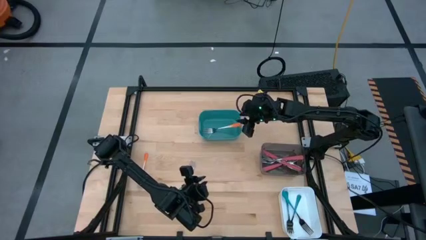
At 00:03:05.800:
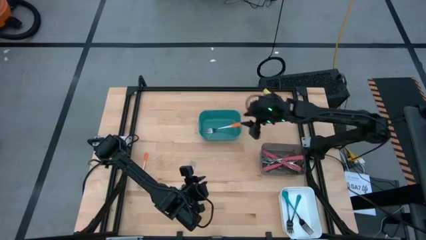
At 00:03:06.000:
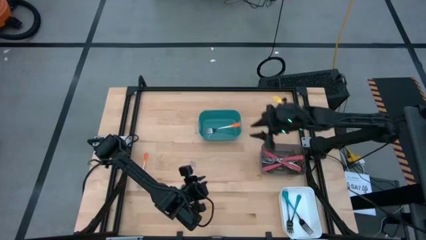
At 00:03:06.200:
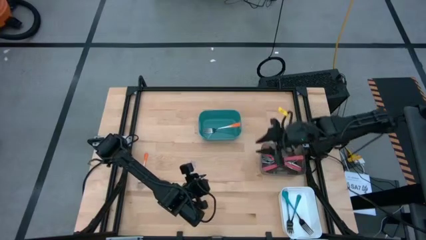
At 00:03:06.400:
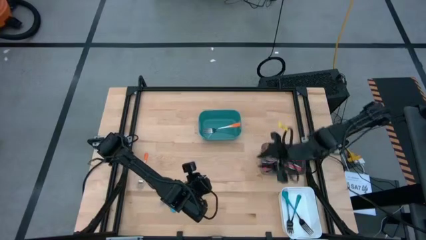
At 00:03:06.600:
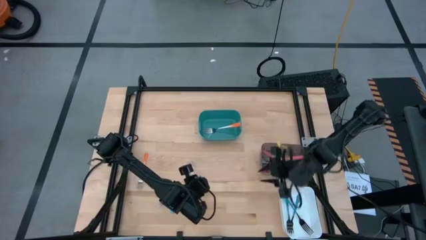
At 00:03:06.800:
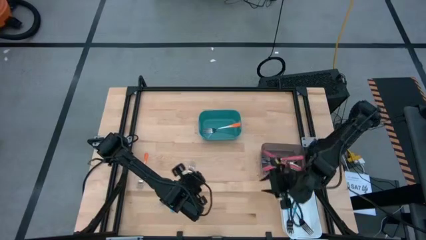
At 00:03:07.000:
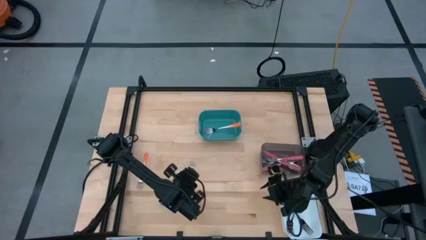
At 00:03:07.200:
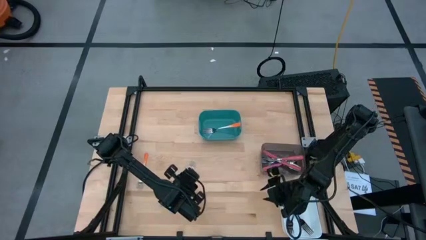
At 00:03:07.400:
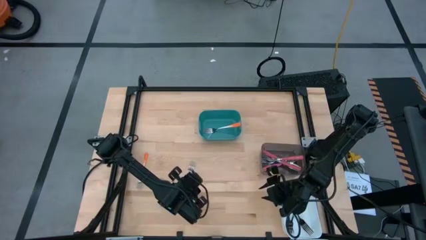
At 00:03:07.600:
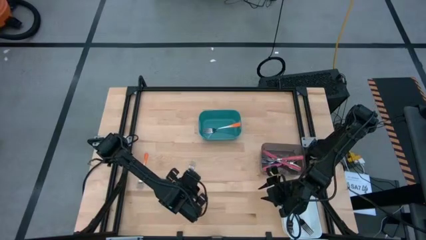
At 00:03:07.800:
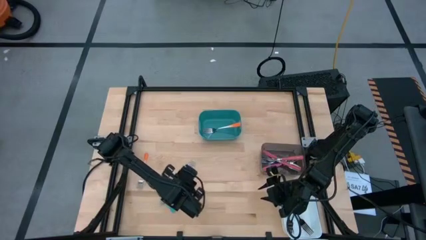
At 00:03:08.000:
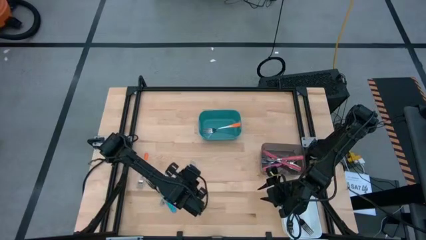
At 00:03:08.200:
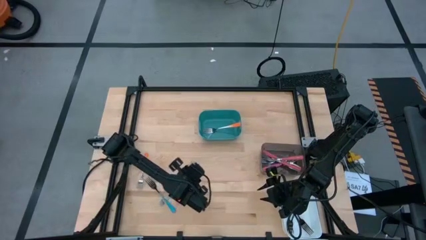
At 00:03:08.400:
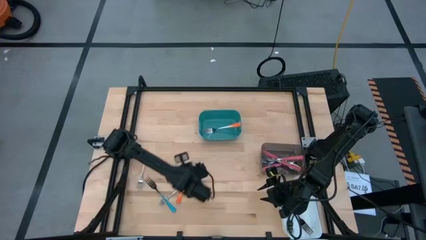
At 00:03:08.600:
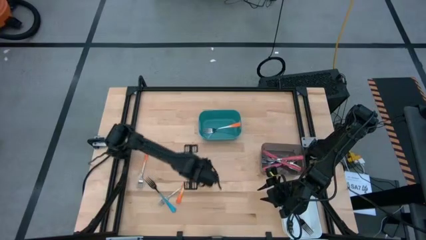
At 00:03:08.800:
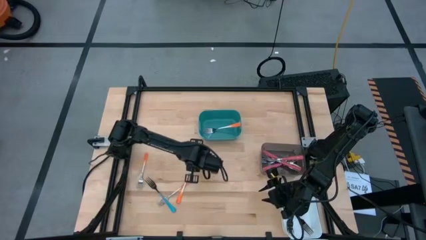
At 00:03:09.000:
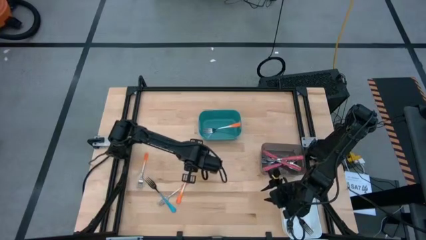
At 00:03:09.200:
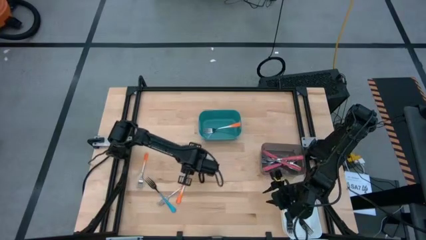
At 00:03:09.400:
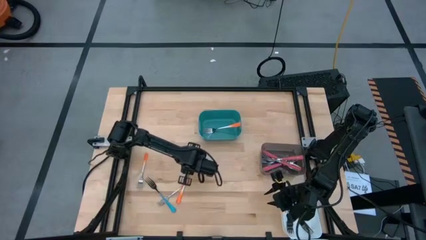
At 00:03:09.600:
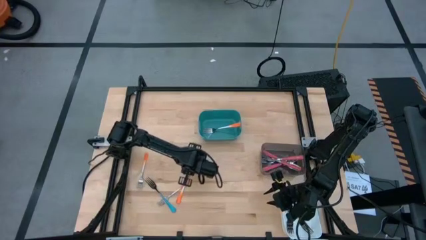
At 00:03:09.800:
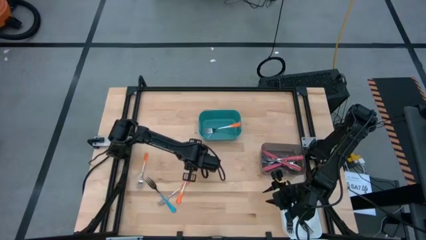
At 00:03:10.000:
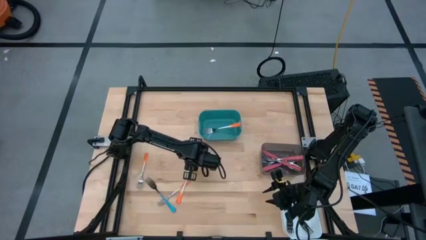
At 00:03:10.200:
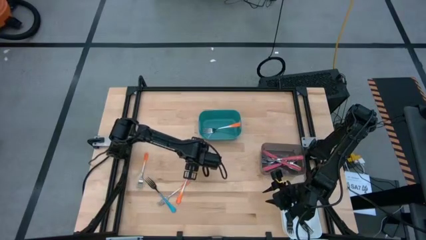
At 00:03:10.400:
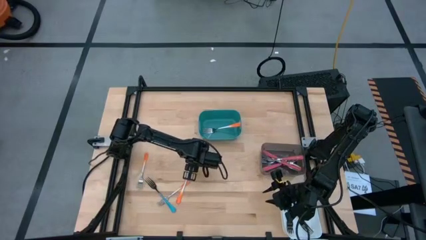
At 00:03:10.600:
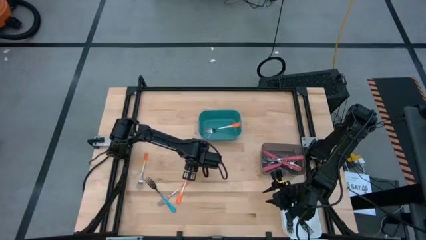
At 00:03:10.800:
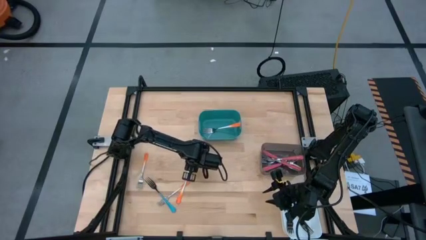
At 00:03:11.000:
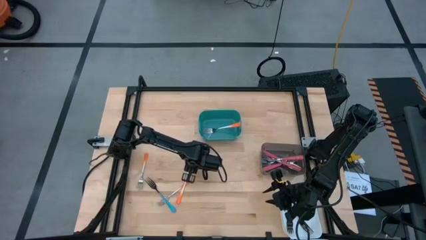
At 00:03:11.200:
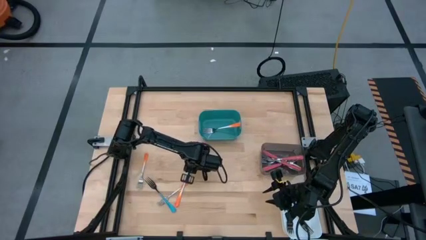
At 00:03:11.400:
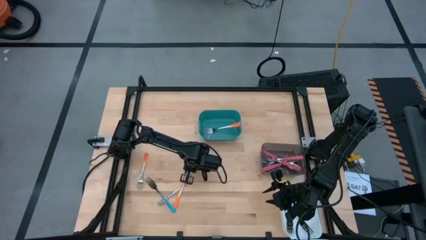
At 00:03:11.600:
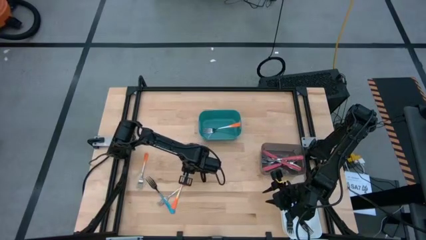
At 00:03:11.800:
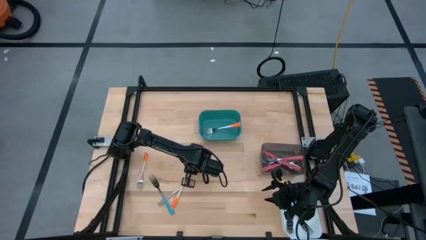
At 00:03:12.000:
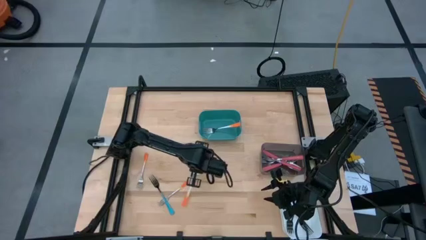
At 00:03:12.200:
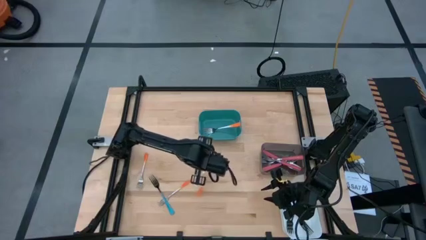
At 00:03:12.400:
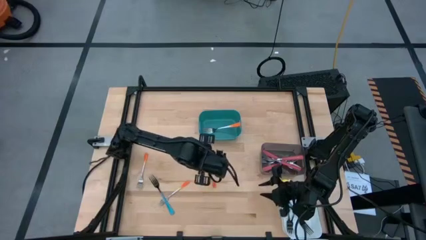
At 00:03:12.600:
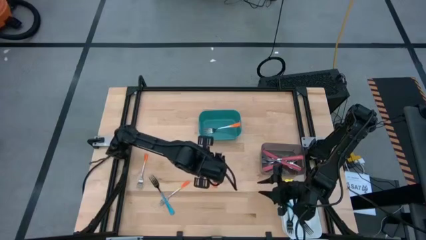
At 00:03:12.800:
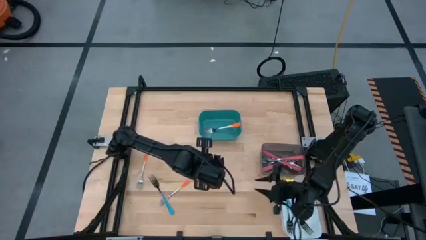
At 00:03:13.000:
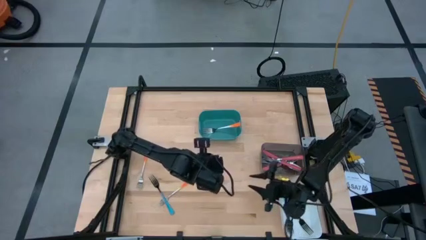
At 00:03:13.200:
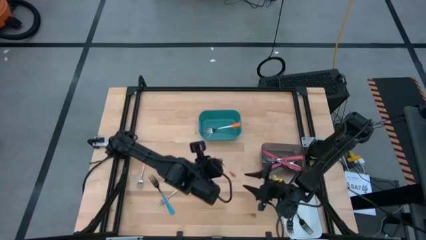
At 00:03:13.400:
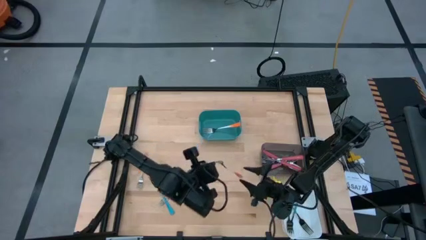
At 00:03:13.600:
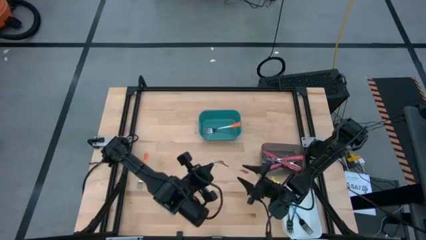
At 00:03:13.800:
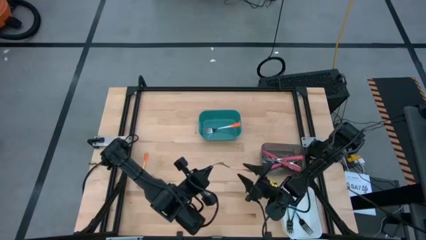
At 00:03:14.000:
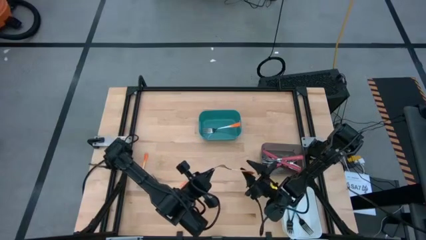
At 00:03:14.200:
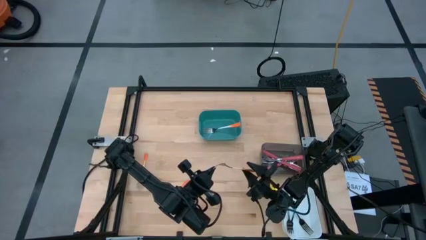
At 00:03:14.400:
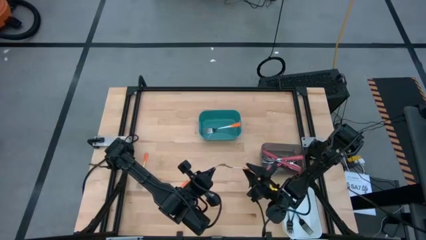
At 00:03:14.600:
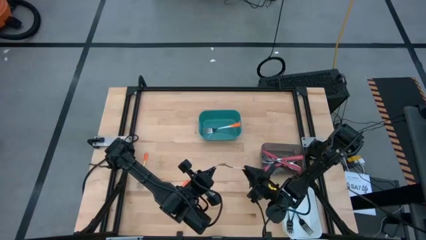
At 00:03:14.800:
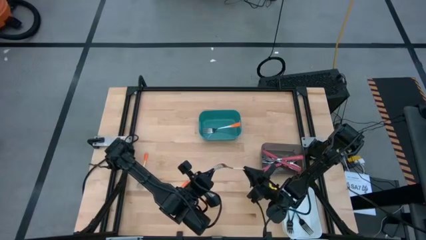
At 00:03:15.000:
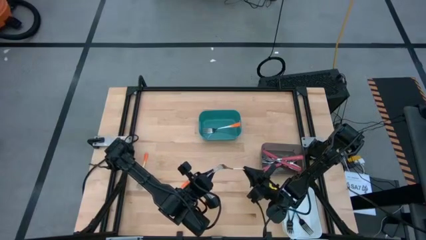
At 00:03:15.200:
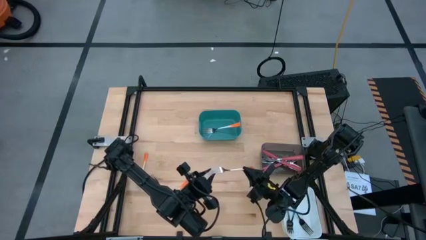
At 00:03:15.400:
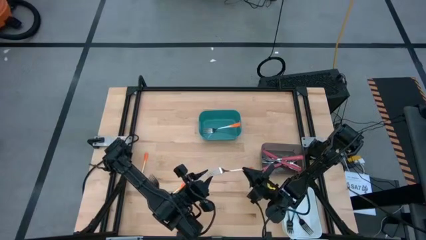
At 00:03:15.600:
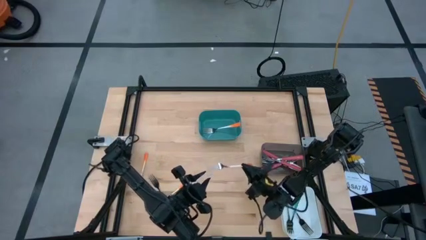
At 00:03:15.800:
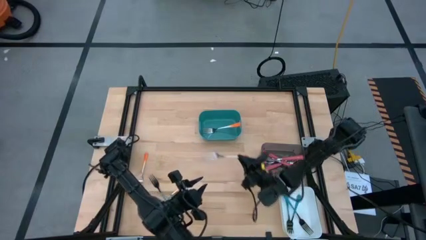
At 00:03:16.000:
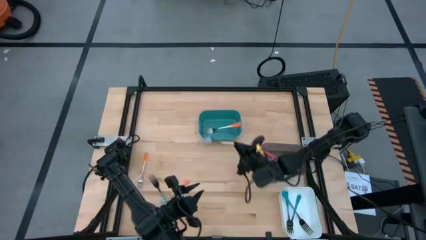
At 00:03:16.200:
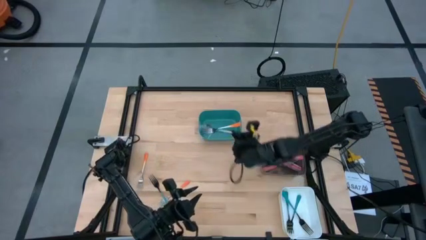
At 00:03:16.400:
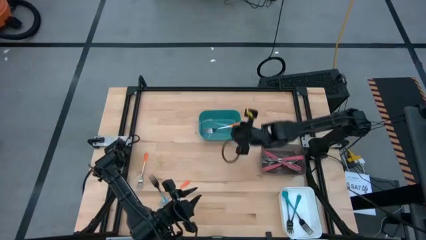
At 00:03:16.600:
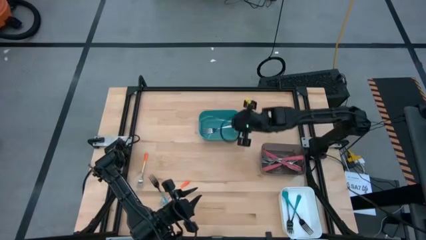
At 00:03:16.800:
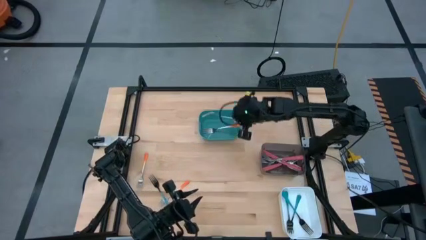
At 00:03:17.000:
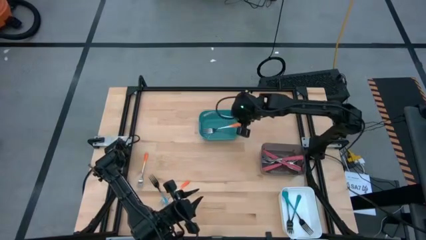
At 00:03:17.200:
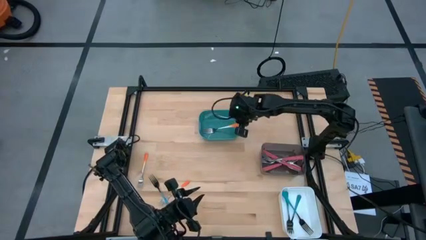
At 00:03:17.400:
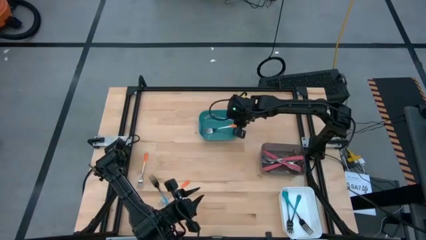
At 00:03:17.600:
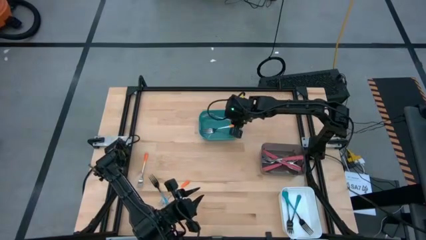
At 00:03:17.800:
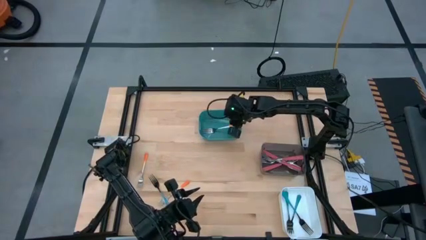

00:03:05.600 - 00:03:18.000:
Task: Sort silverware by color (type)
Put the orange fork into the blue bin

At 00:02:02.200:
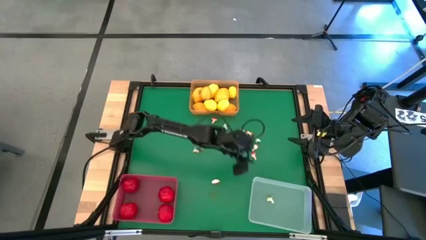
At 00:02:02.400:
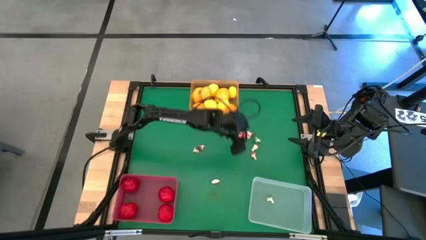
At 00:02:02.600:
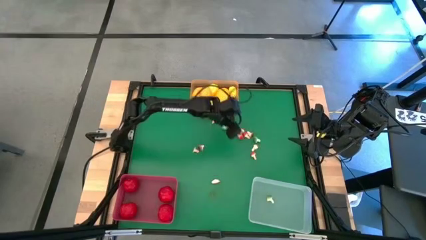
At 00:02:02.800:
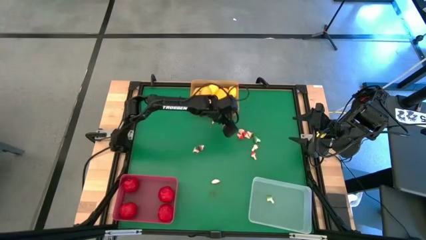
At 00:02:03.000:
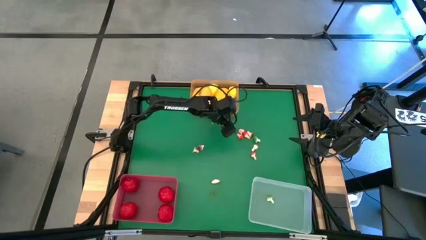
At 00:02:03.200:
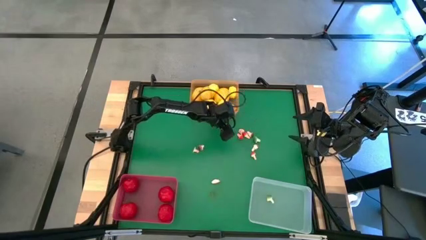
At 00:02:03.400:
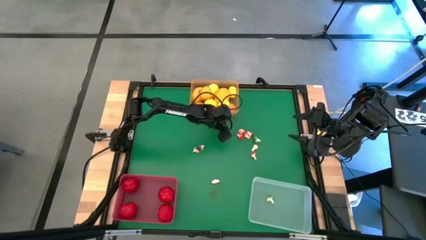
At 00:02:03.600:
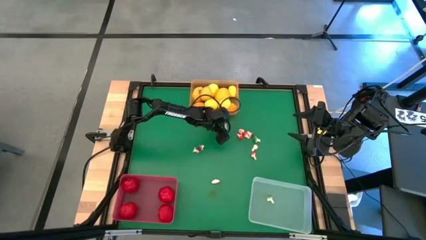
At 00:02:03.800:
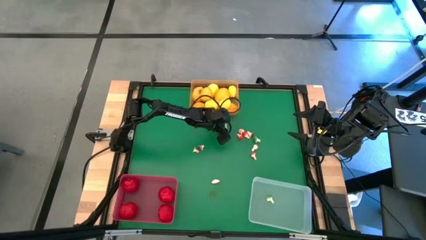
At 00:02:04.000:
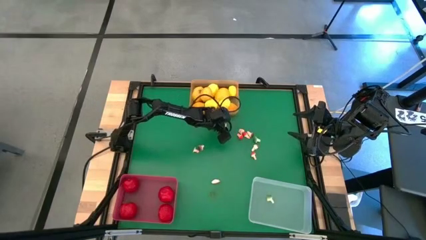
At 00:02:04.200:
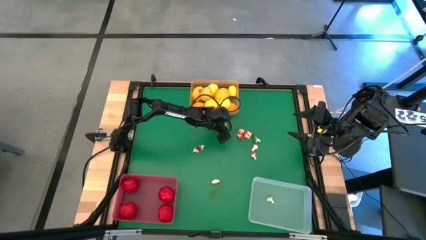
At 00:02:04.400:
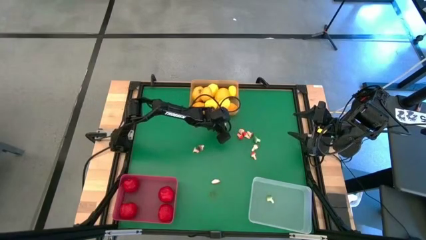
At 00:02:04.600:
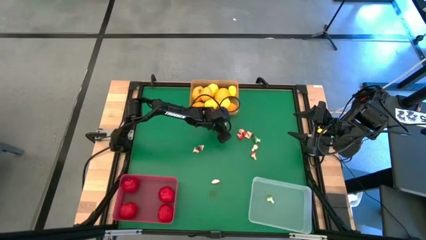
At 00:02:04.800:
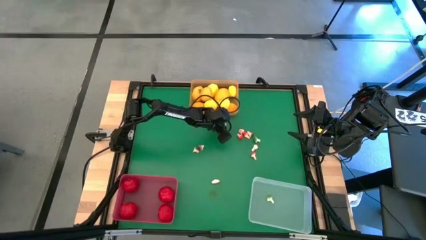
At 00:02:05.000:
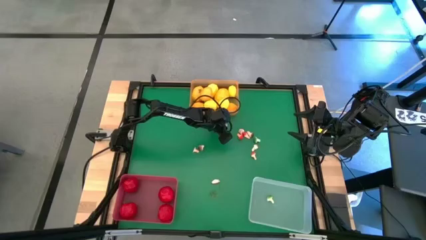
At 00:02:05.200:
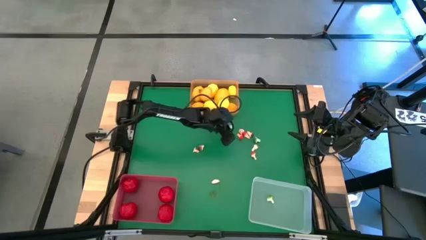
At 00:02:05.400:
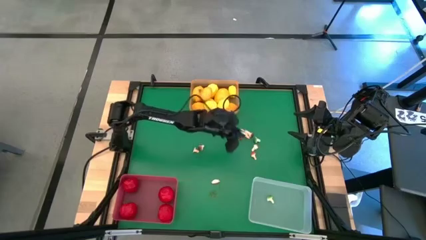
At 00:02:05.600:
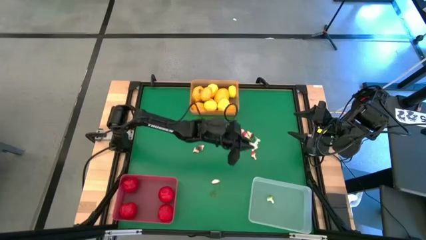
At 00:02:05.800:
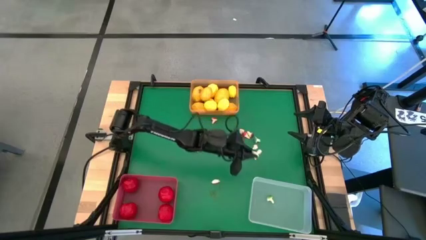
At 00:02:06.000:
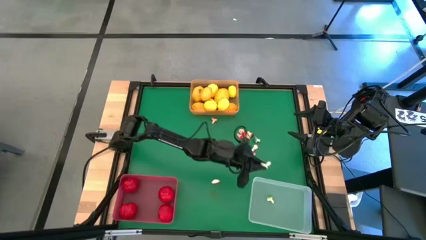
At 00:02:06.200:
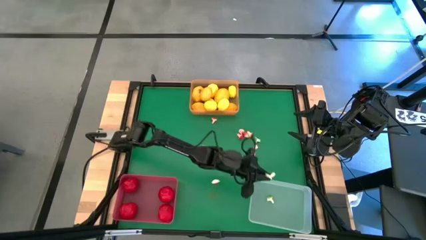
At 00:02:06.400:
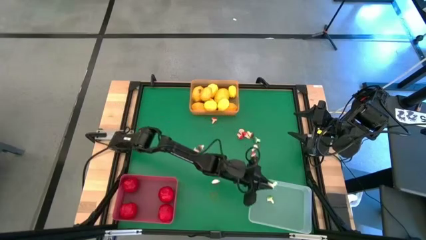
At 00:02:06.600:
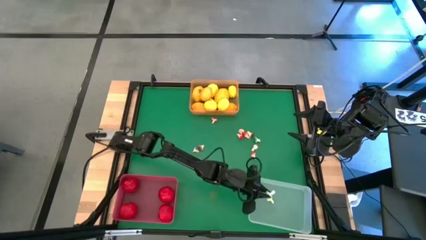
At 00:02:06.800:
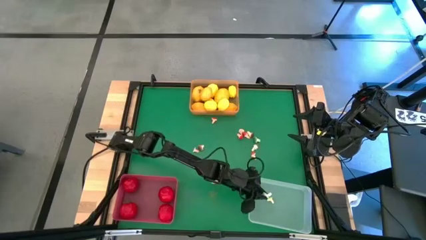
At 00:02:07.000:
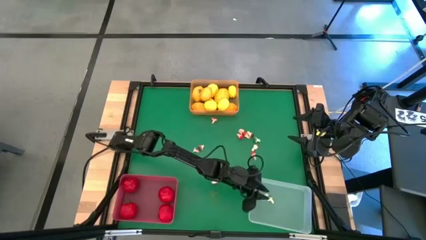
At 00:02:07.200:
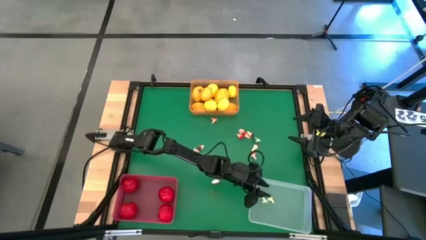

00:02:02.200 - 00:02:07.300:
Task: Sort produce into baskets
Put the green mushroom into the transparent bin
